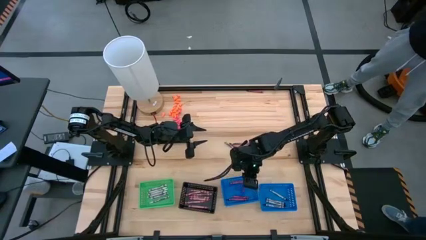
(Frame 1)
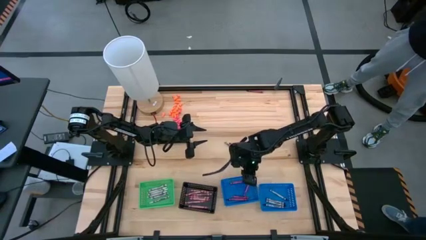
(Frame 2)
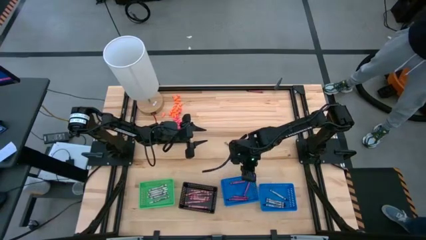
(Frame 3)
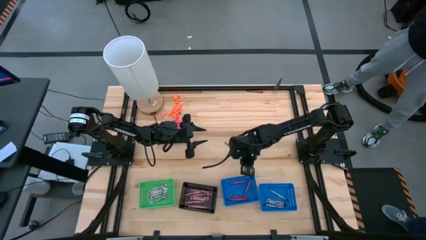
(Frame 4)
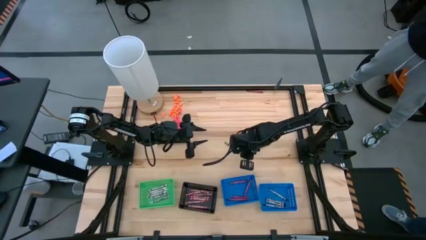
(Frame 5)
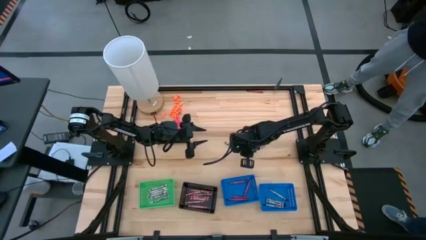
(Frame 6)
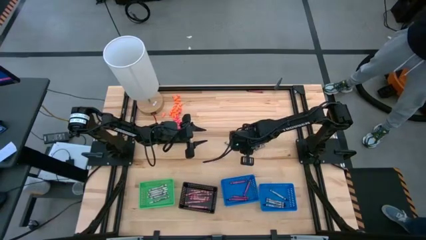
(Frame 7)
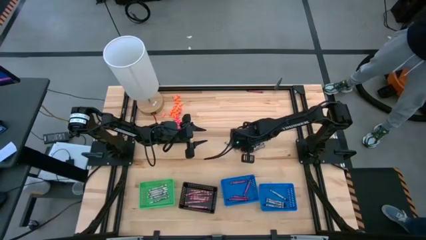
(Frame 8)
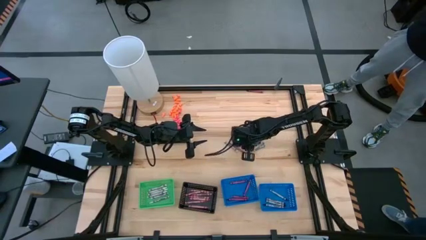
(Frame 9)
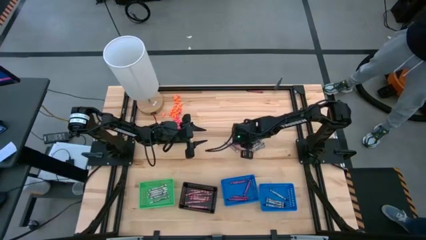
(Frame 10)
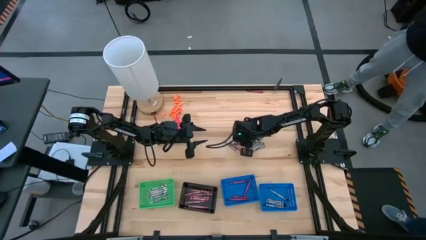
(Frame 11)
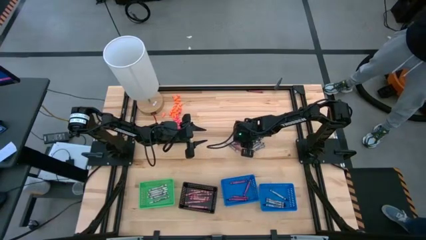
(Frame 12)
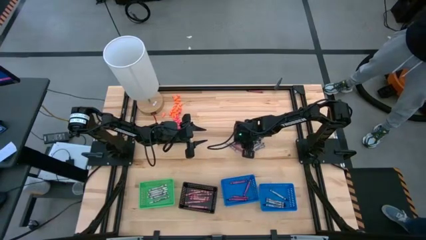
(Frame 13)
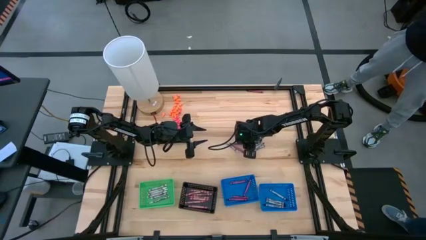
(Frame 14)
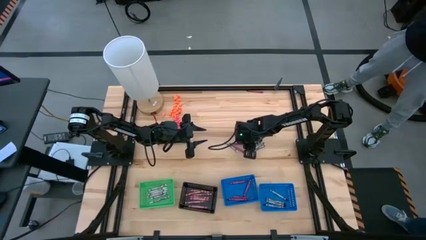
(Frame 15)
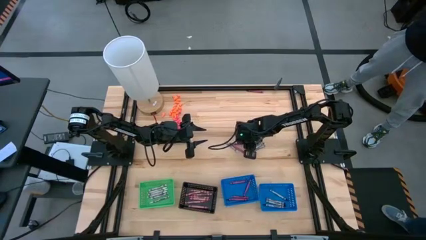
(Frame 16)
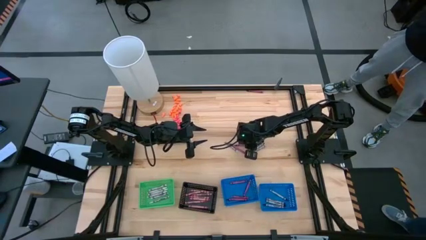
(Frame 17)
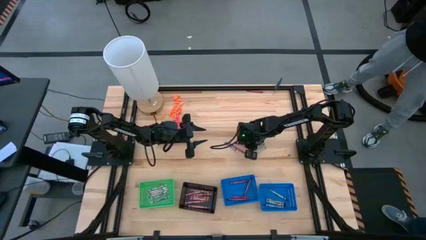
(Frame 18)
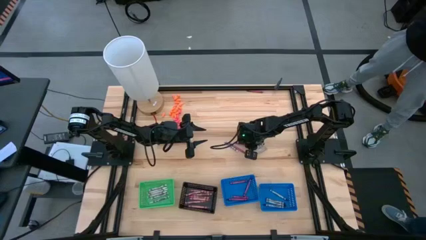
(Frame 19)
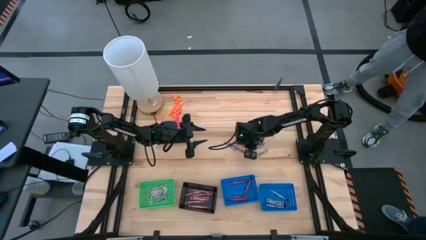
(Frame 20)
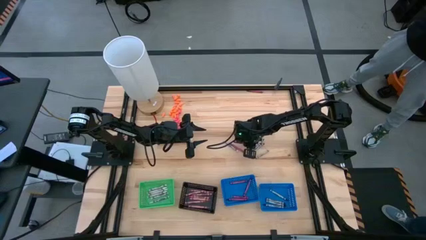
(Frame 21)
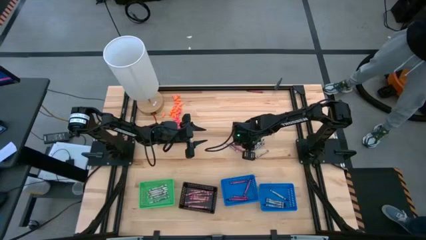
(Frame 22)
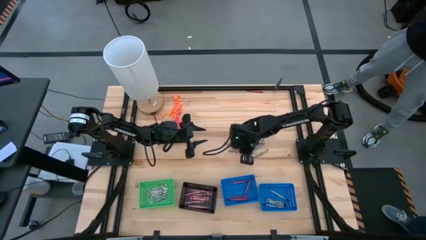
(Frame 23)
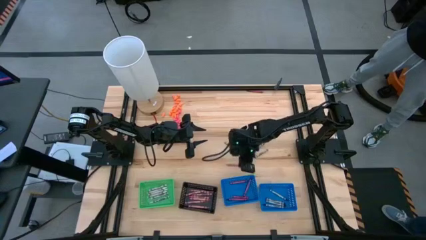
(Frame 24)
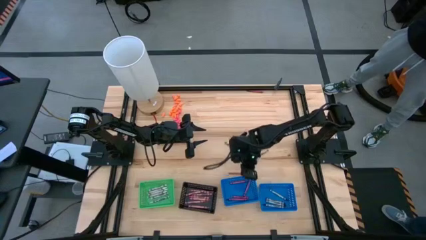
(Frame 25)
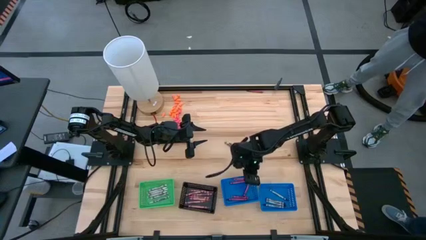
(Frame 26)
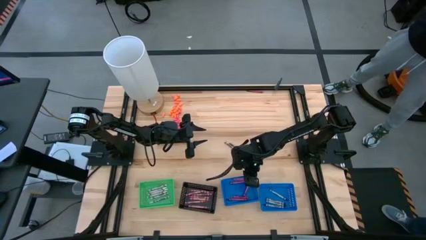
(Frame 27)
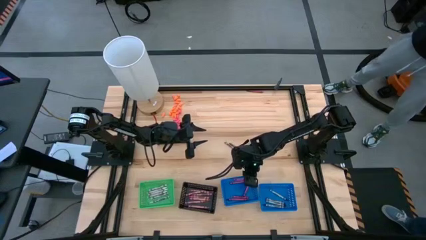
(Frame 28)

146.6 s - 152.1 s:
Task: Sort crayons
Put the red crayon into the left blue bin

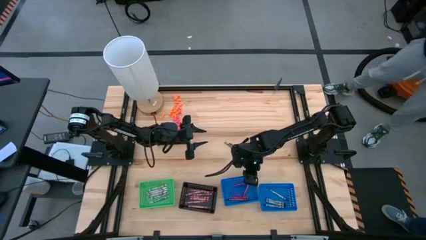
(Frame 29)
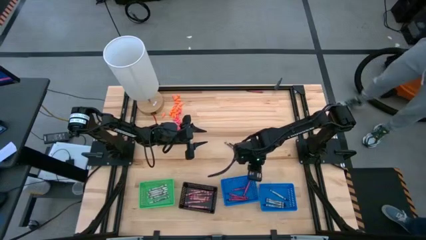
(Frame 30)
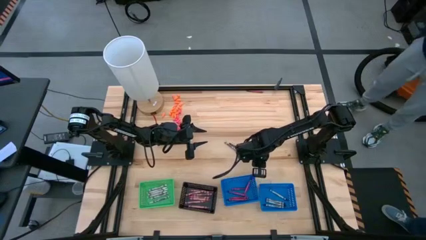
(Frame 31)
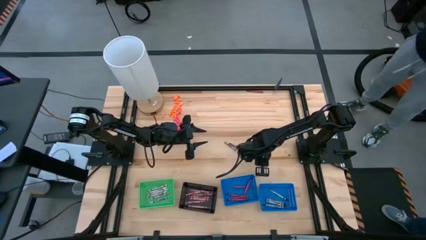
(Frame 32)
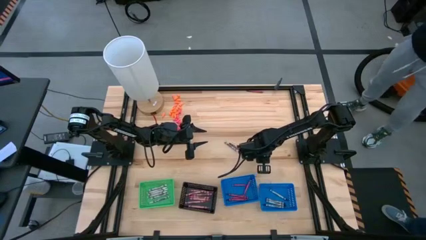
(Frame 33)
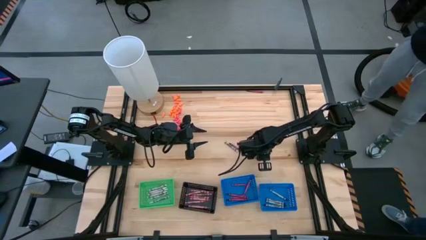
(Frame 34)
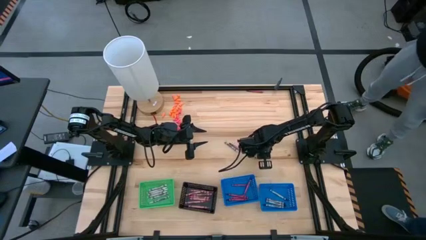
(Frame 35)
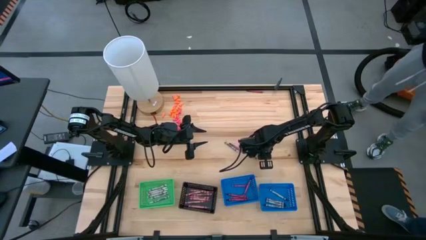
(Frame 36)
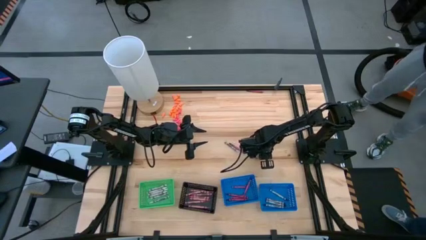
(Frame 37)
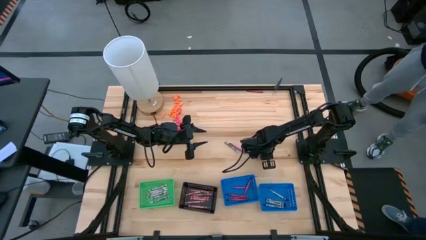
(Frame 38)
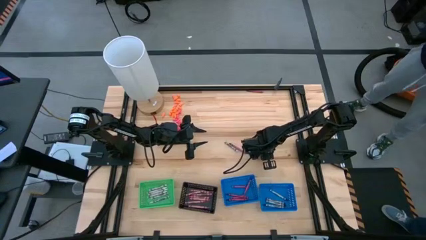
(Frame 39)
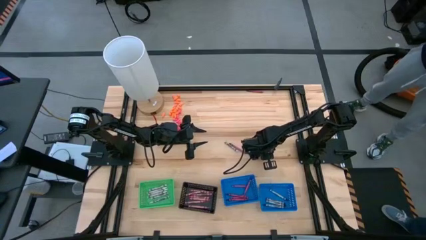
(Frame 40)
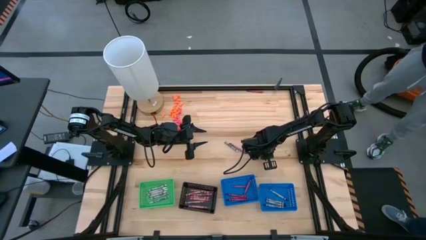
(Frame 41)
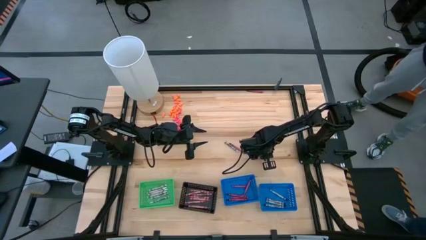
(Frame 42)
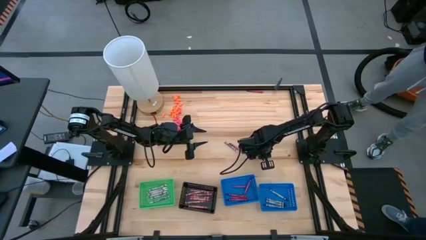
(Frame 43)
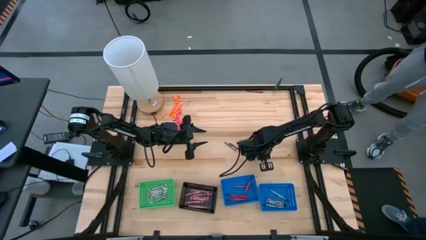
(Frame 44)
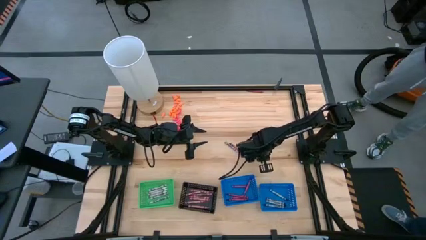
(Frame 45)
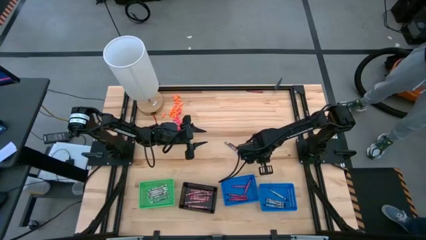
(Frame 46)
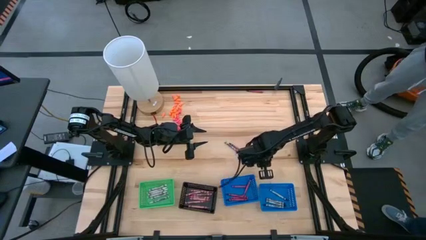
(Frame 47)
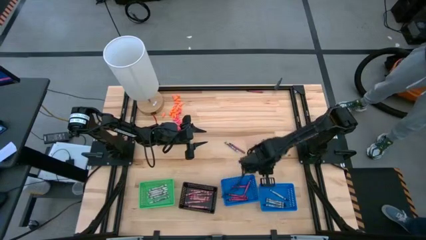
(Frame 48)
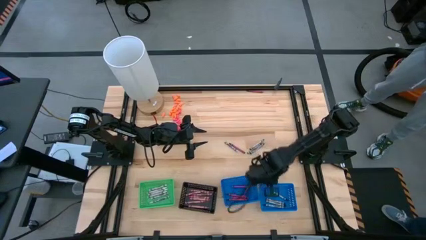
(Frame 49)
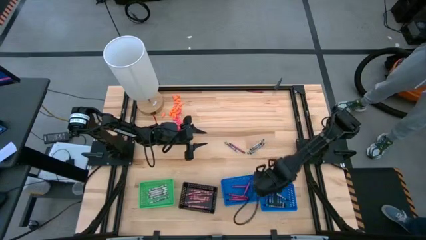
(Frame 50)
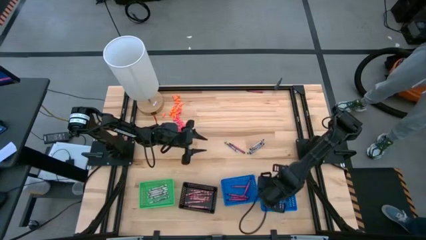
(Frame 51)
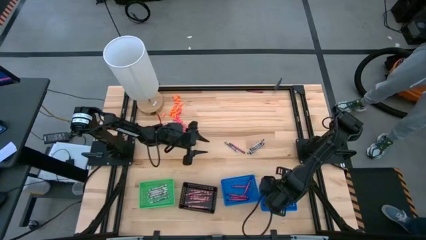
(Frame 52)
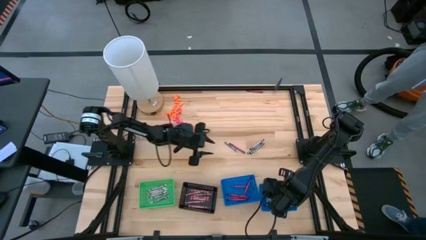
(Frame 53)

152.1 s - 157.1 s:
Put the black crayon into the right blue bin

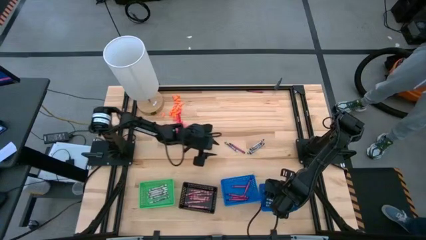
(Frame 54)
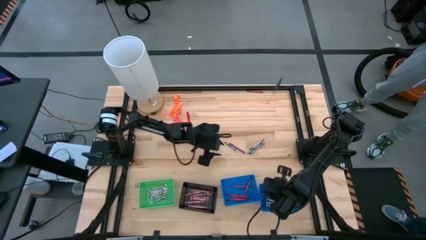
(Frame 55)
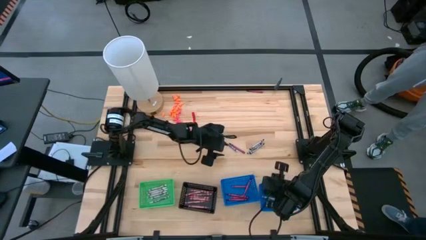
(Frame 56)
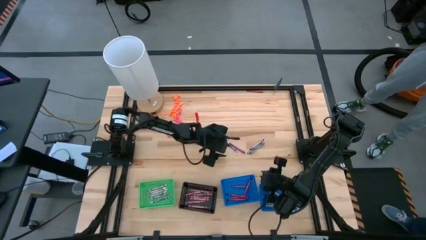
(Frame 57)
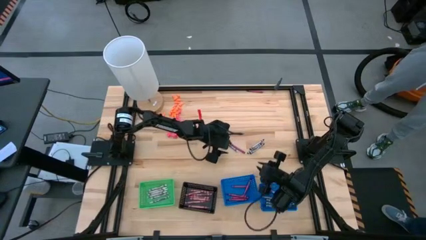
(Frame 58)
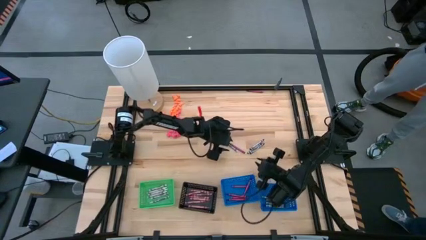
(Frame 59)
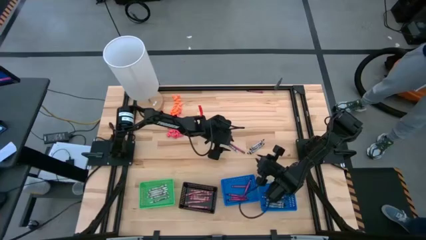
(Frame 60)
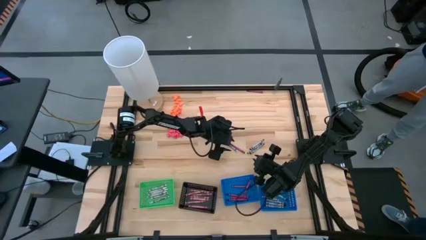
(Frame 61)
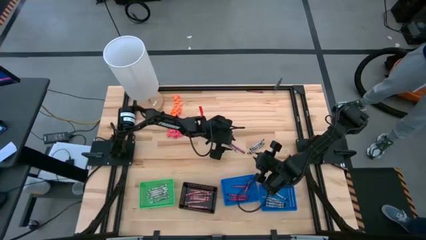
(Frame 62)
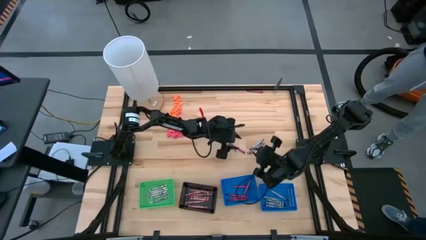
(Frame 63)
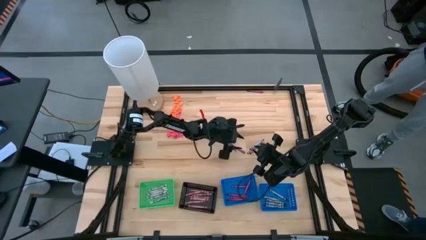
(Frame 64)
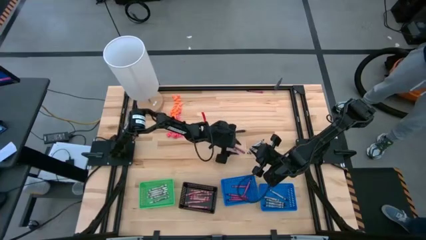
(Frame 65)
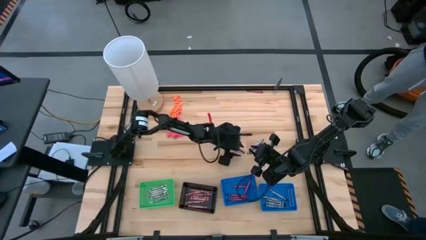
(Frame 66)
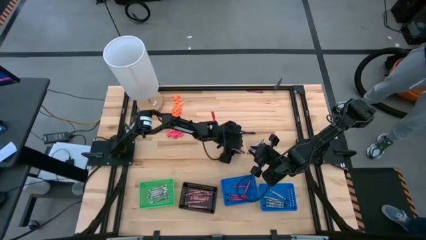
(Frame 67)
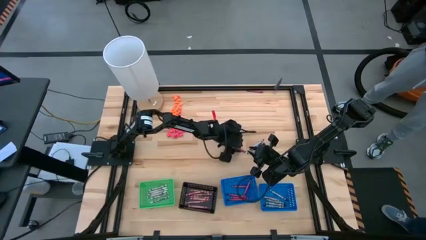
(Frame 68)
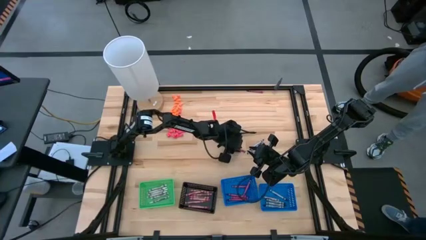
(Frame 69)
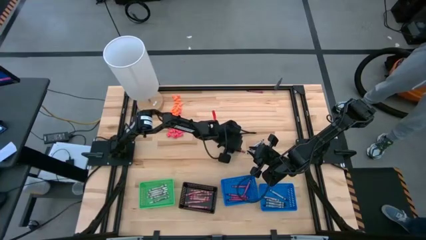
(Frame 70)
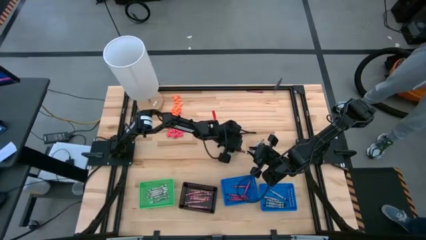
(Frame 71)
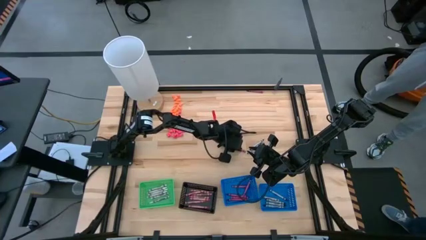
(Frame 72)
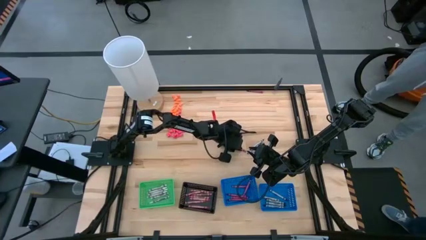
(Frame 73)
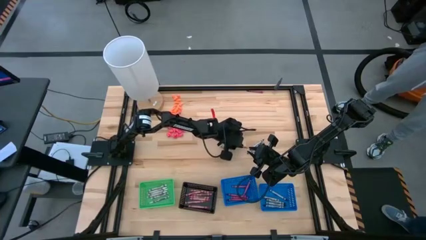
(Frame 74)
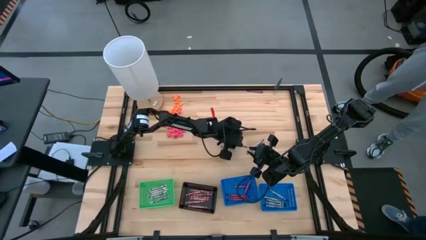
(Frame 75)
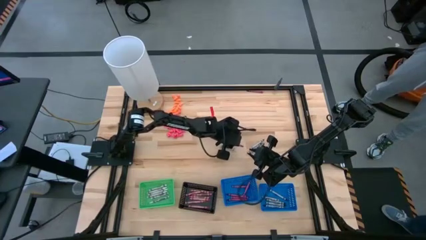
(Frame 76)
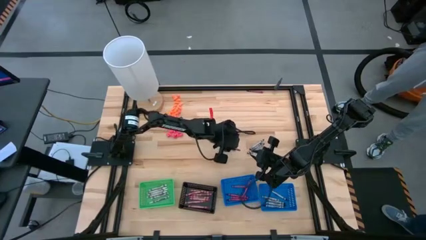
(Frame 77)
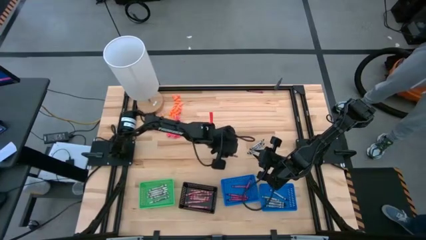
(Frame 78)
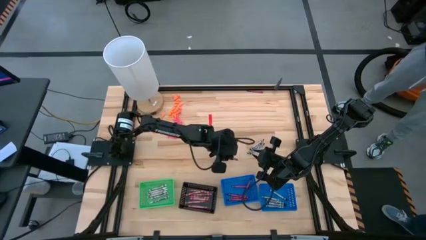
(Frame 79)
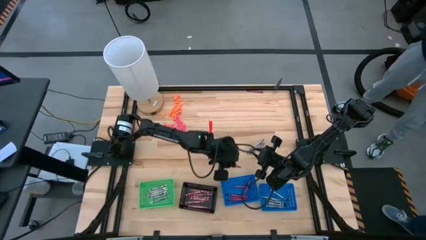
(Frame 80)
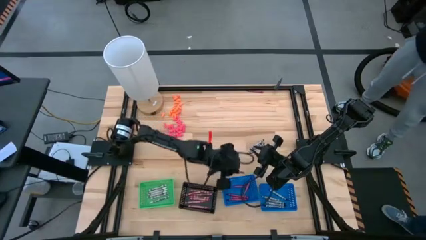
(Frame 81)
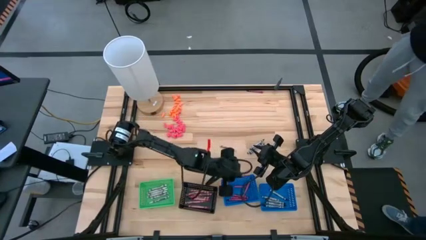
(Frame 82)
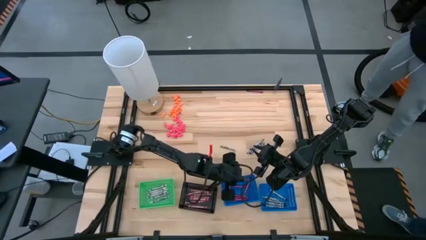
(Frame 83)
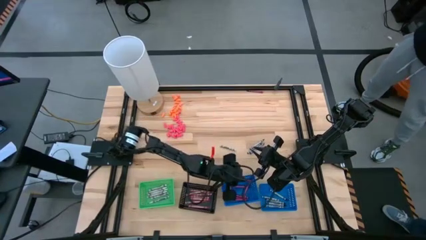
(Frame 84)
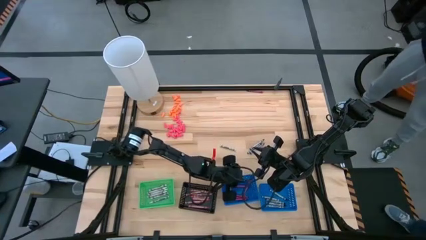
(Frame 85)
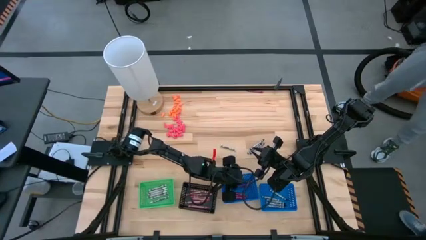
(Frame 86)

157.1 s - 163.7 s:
Put the red crayon into the left blue bin
